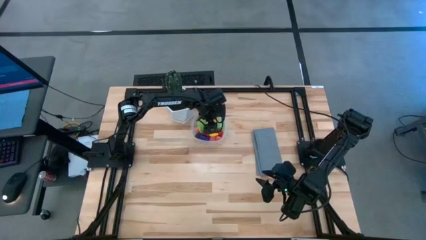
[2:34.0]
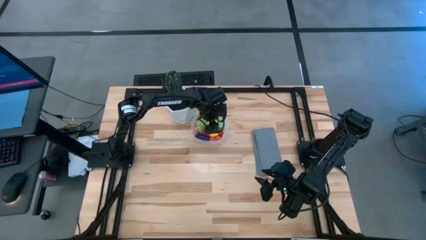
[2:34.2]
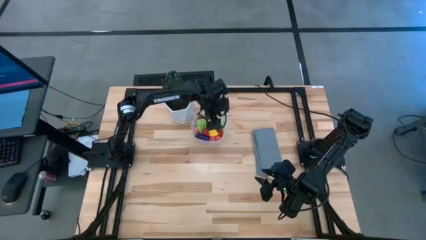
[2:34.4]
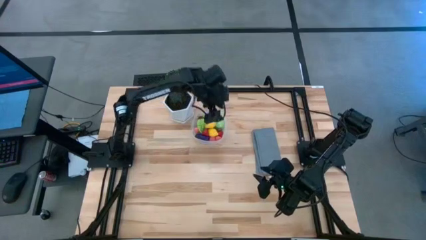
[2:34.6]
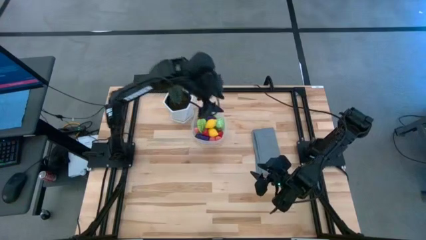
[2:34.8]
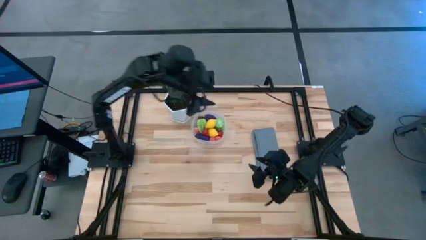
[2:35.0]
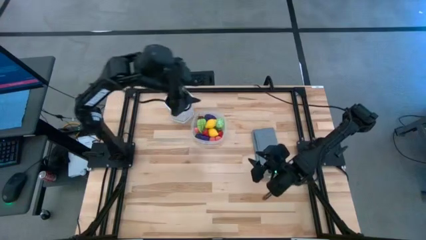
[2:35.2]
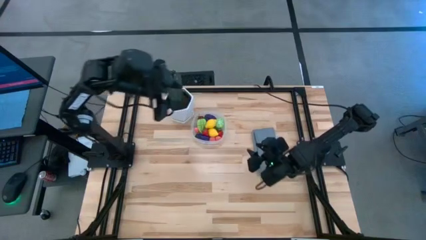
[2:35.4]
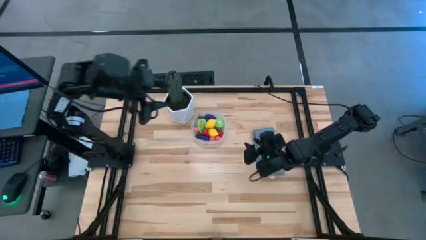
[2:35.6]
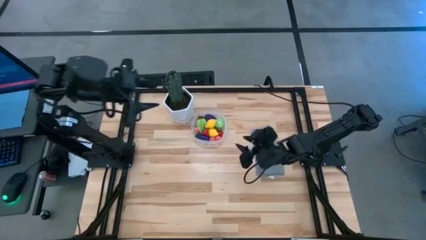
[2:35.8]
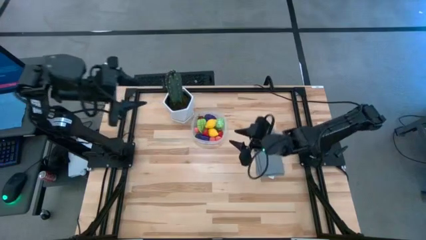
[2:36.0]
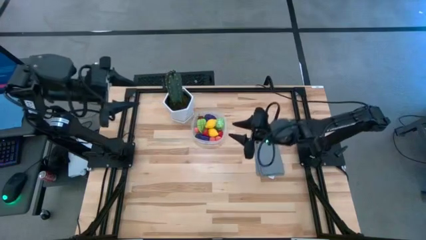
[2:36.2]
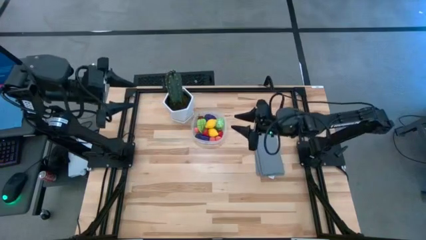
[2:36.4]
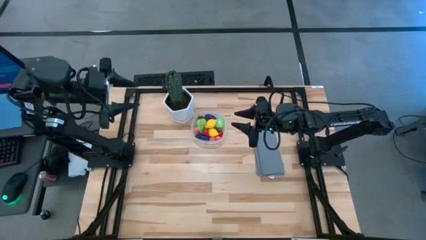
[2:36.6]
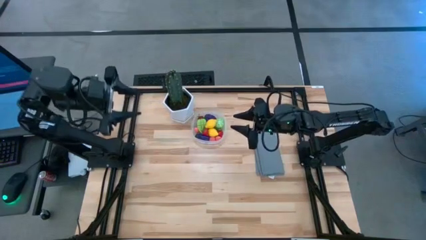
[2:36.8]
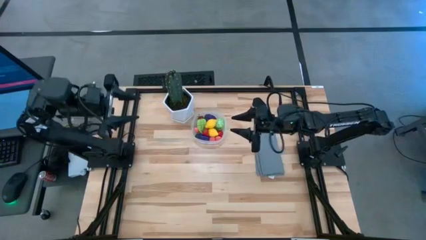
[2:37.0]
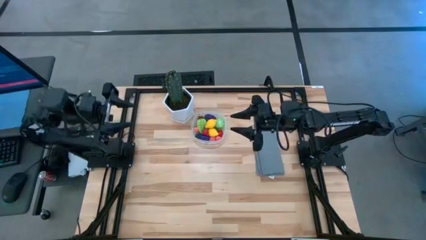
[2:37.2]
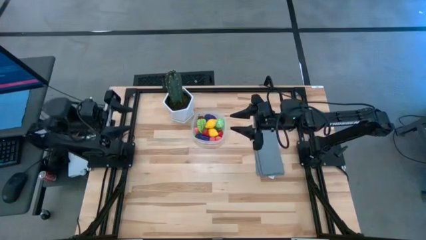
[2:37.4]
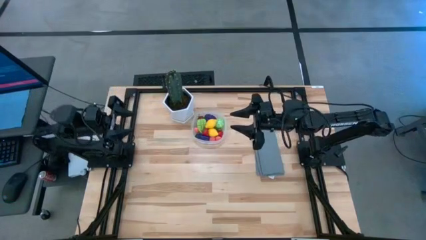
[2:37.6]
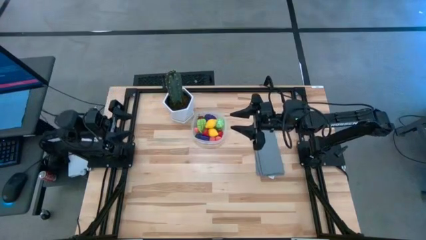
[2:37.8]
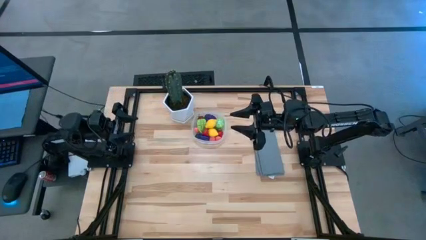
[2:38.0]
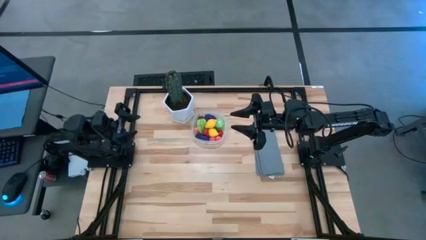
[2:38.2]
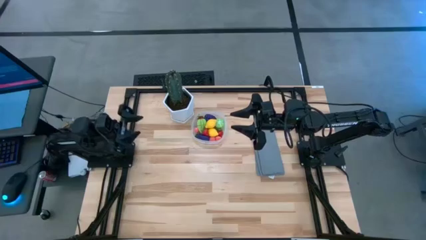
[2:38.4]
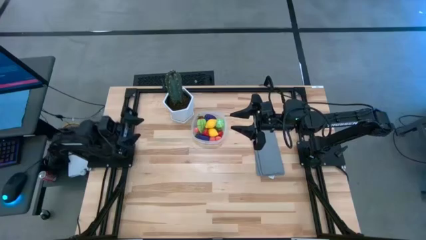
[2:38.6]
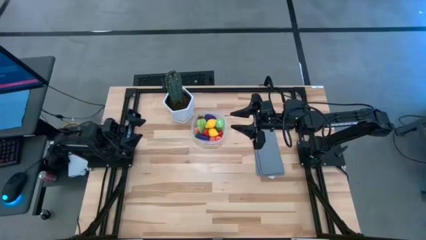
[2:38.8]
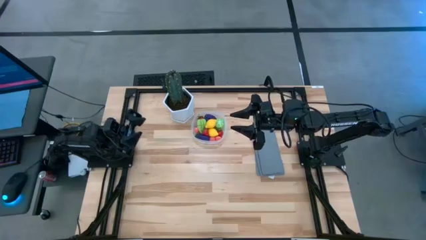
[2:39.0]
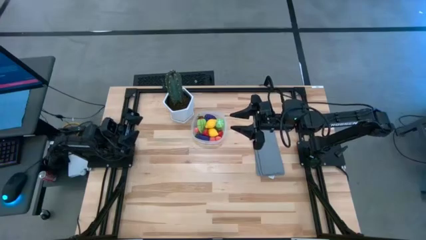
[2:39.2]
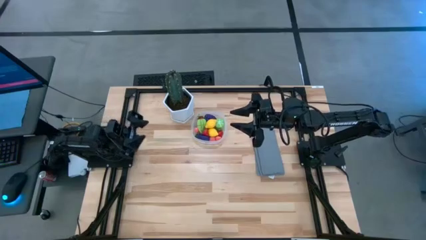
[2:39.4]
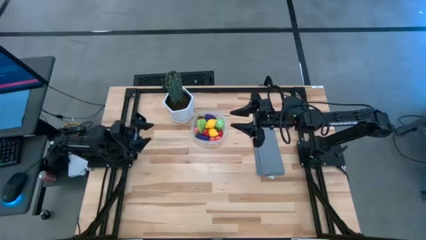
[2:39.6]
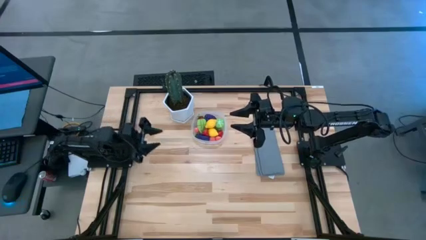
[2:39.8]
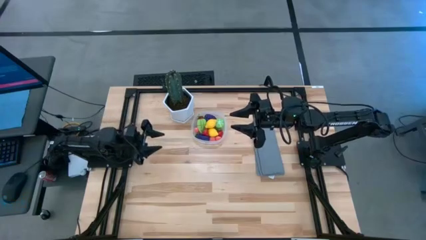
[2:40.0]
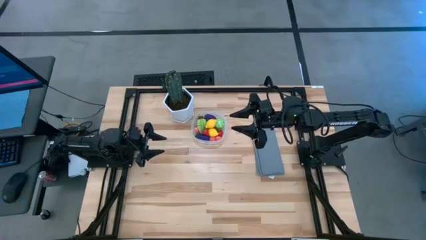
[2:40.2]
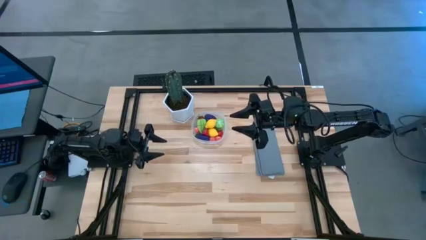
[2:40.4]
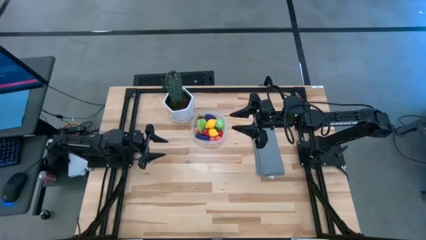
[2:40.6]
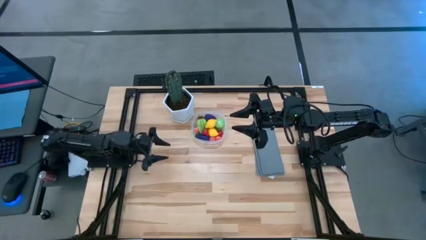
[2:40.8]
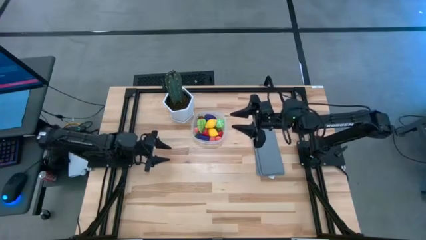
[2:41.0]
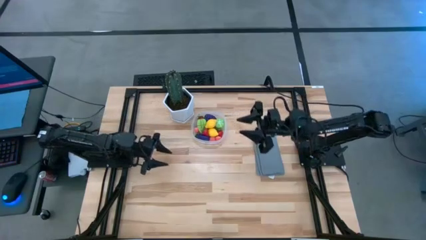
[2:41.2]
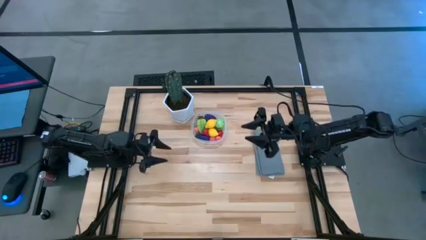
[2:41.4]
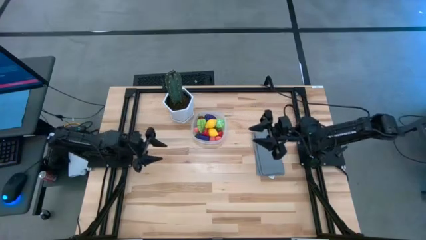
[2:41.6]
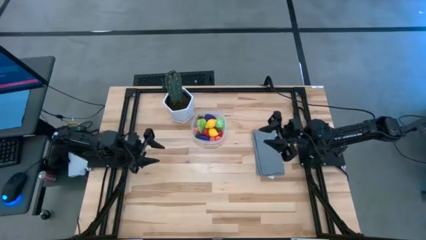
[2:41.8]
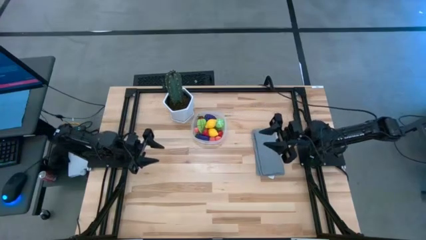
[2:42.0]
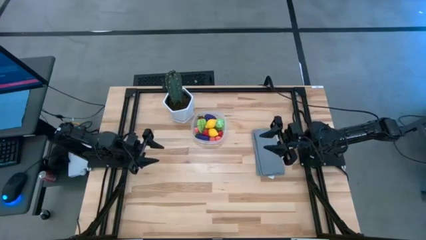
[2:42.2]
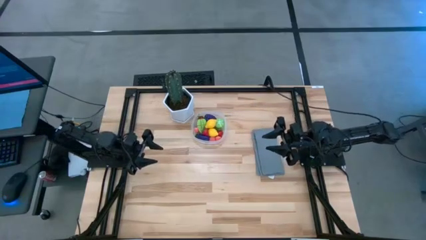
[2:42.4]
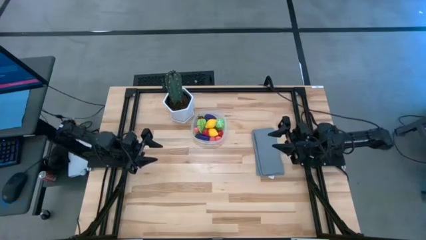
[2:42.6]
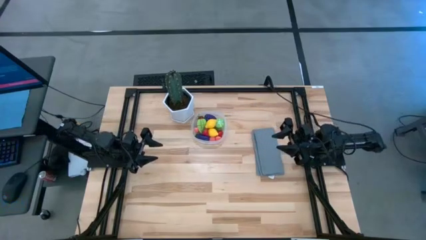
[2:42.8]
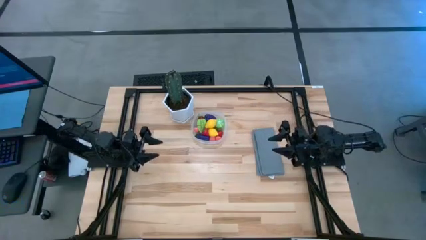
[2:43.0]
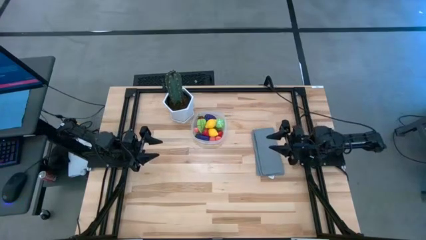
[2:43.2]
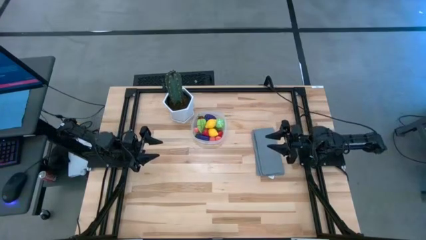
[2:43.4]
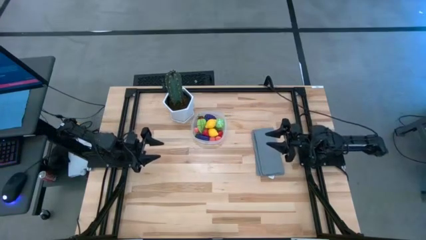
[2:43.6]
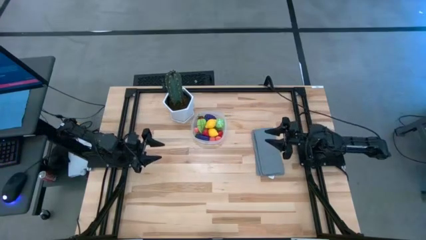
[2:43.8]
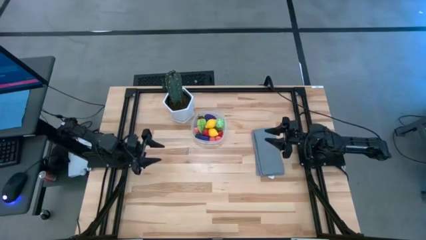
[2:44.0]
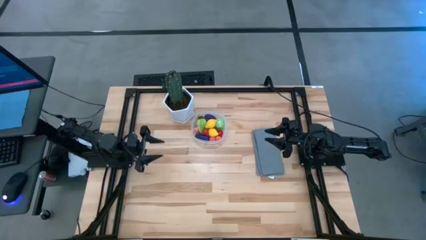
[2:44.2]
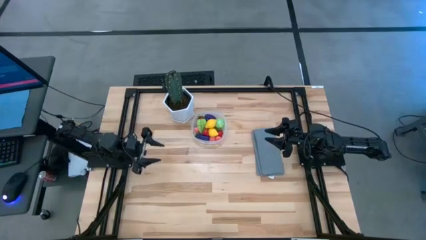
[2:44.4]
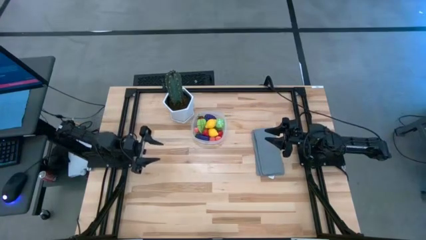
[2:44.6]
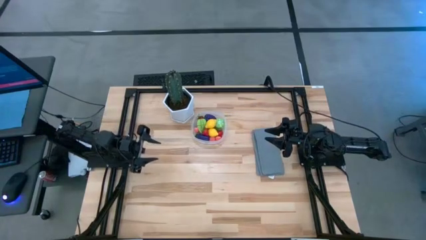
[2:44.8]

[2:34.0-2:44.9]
Task: Pick and placing Produce into tupperware
Return to Home Position

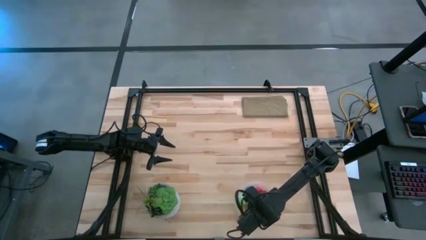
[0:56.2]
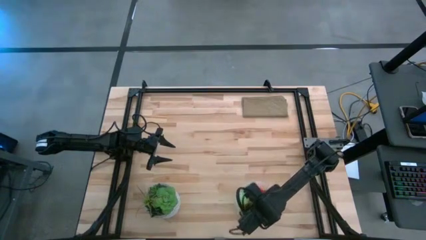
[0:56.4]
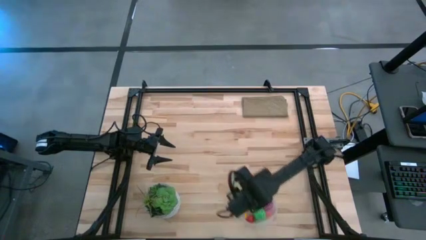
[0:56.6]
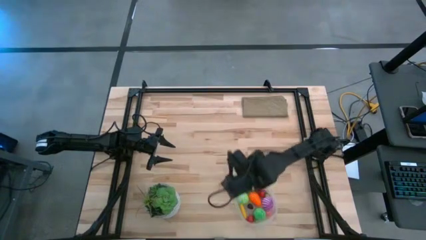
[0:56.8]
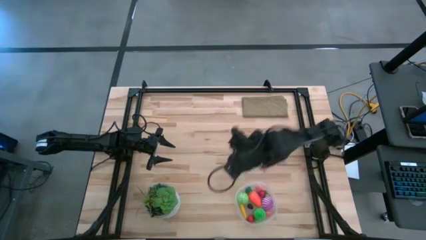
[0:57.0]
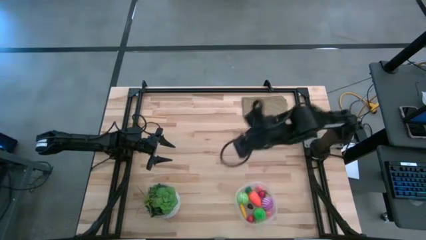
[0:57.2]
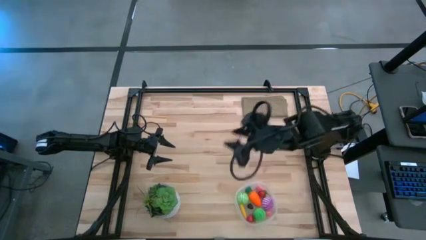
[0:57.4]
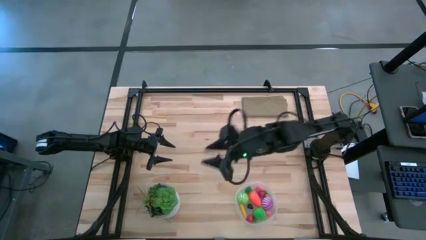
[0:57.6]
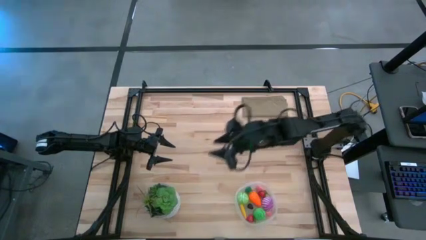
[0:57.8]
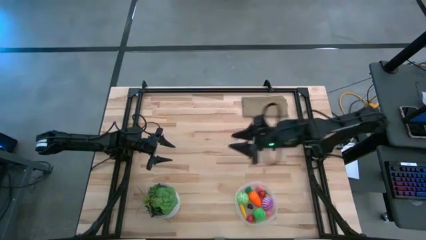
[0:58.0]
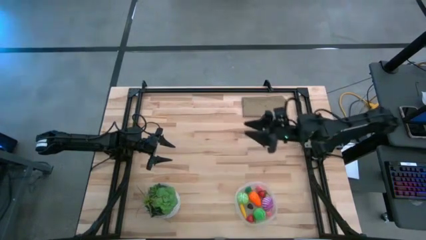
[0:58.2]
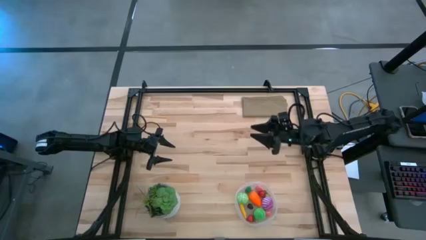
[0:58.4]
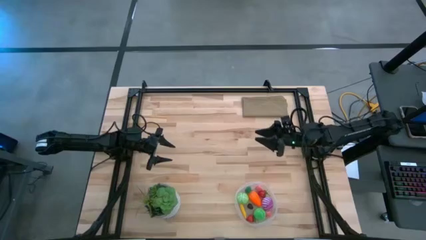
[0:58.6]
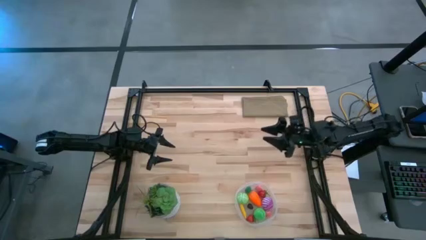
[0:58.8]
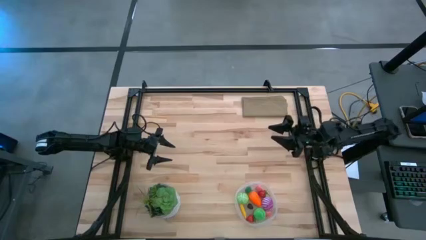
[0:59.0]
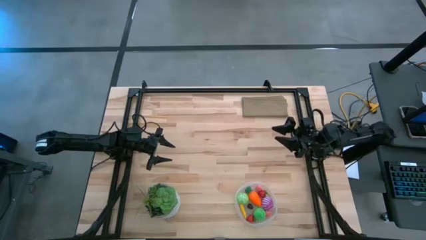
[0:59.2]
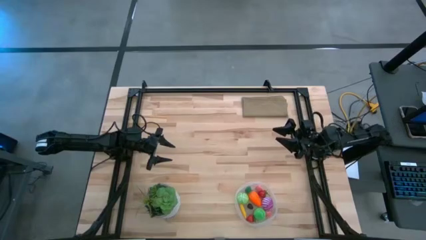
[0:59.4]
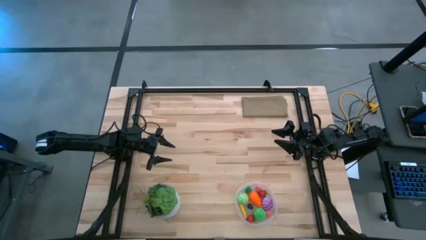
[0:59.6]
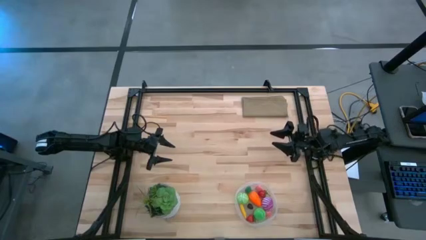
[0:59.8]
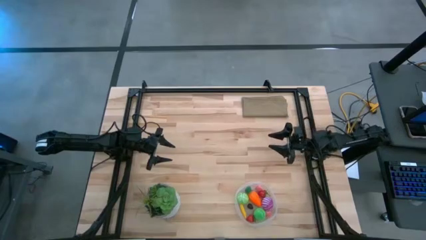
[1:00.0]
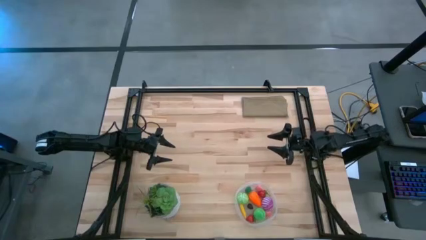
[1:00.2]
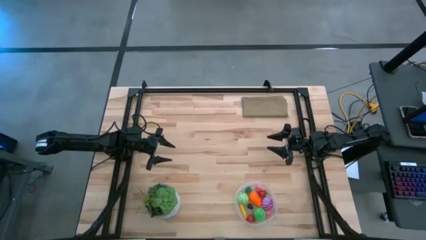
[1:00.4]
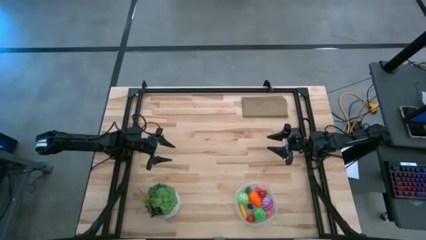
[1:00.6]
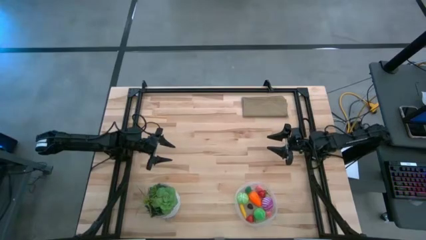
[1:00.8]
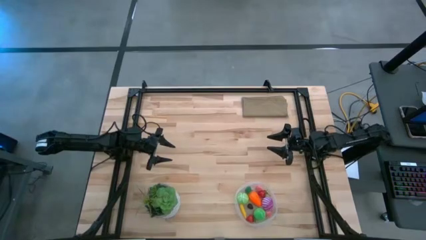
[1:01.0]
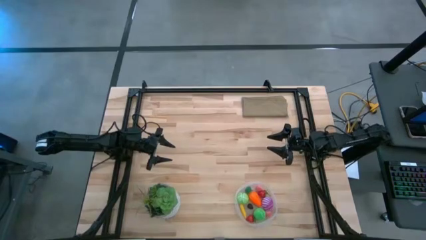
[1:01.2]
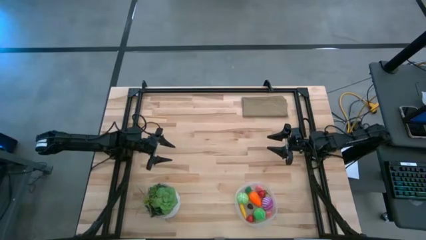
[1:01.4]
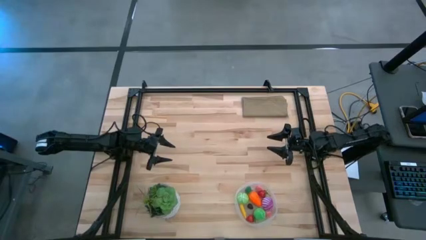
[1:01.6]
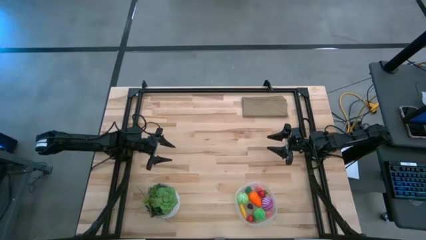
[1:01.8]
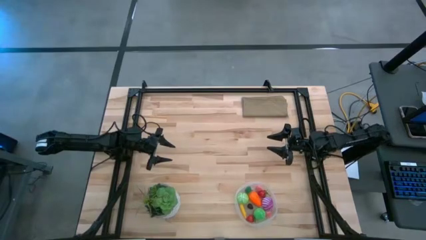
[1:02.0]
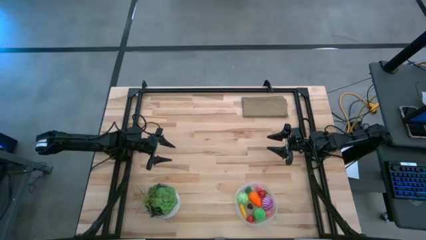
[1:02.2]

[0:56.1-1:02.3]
Task: Pick and placing Produce into tupperware
Return to Home Position
